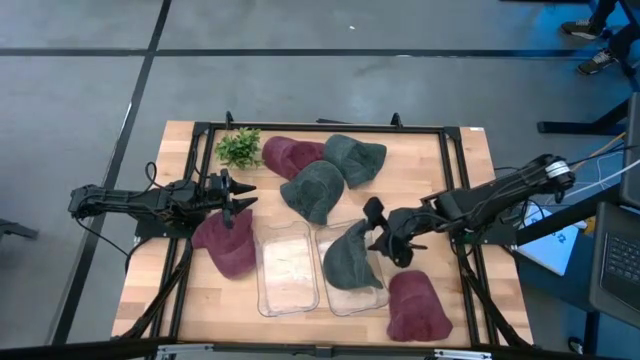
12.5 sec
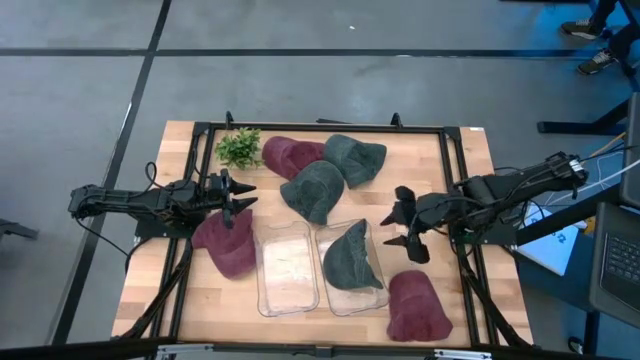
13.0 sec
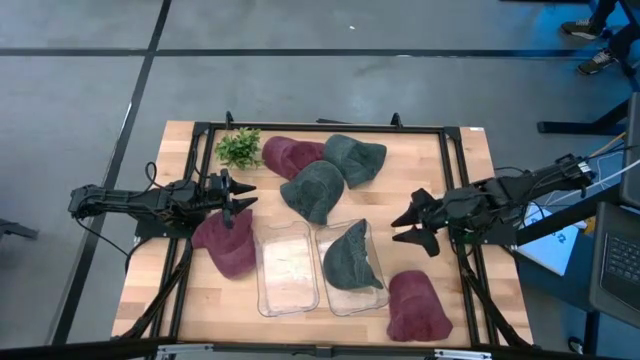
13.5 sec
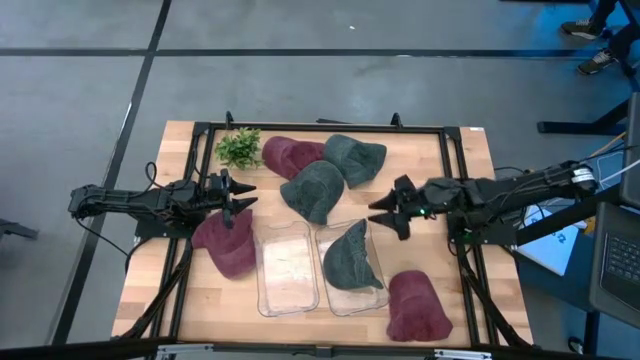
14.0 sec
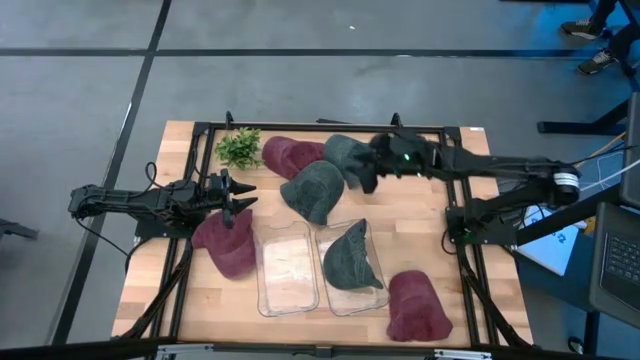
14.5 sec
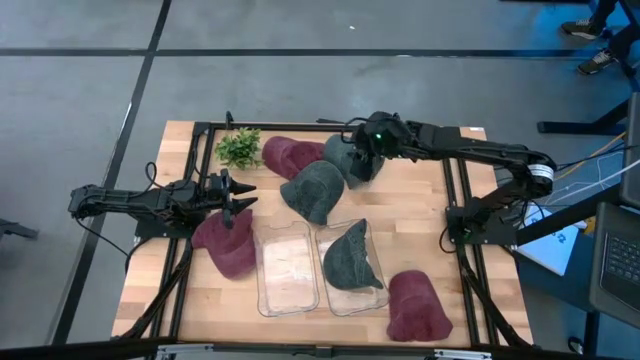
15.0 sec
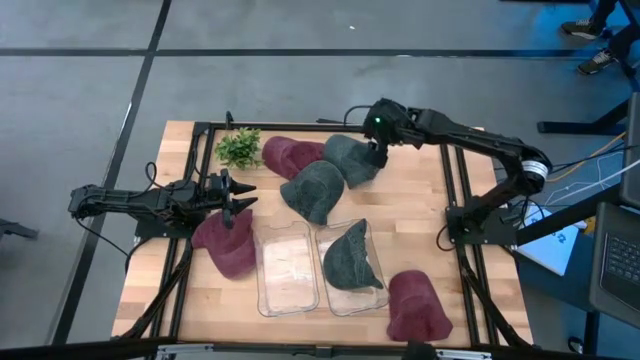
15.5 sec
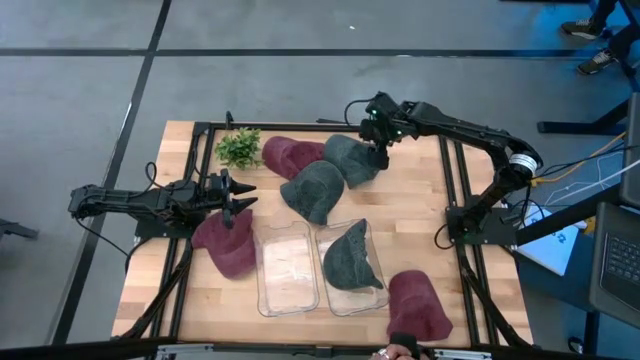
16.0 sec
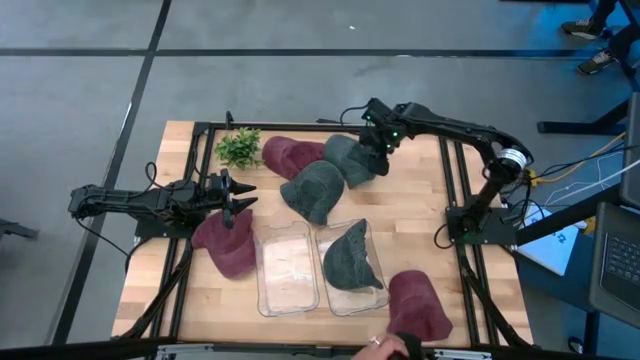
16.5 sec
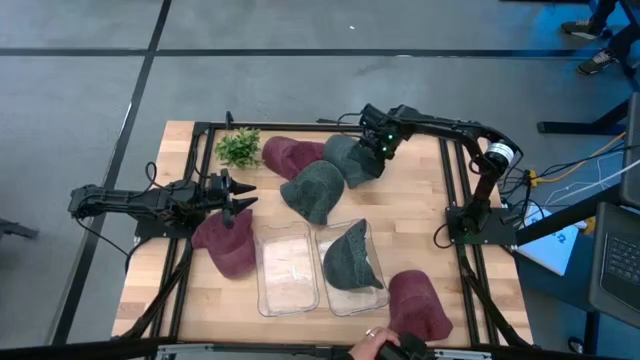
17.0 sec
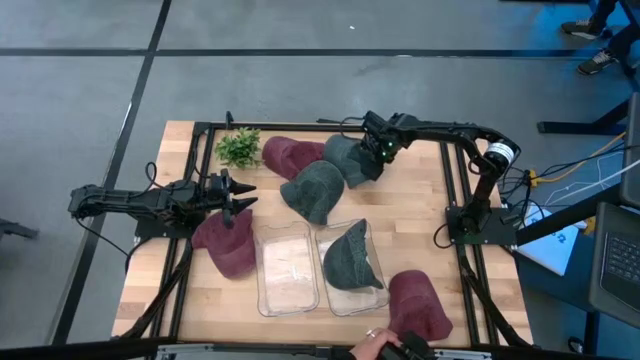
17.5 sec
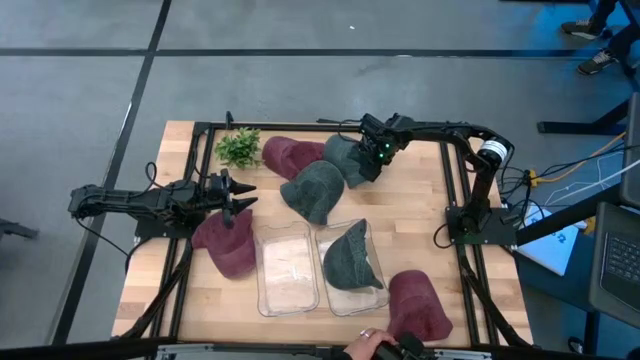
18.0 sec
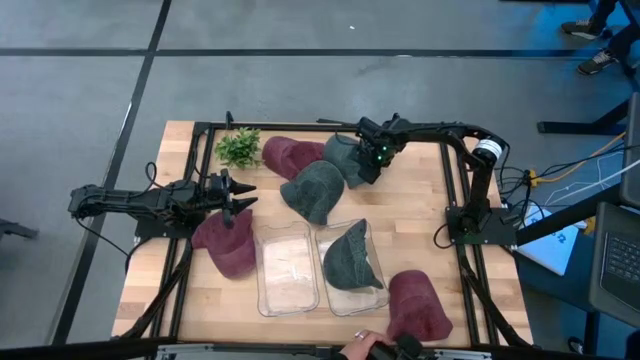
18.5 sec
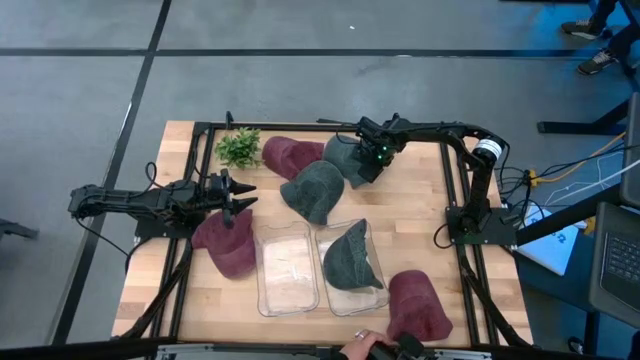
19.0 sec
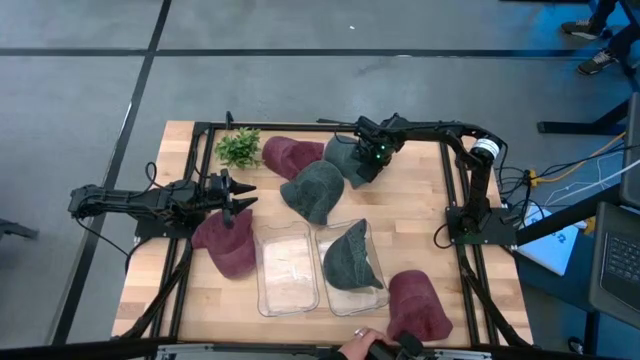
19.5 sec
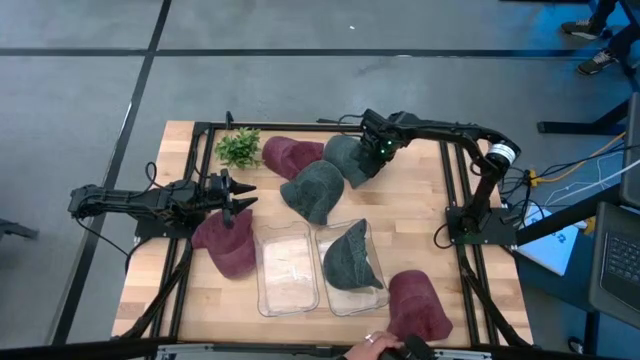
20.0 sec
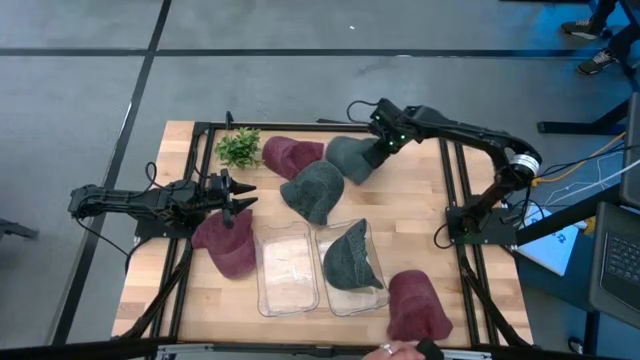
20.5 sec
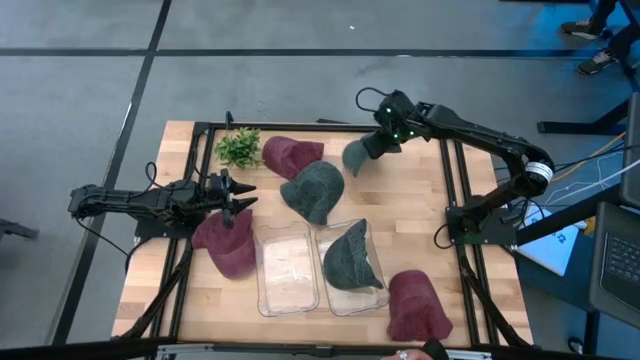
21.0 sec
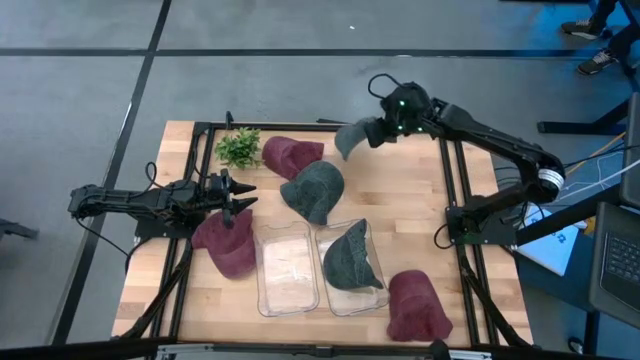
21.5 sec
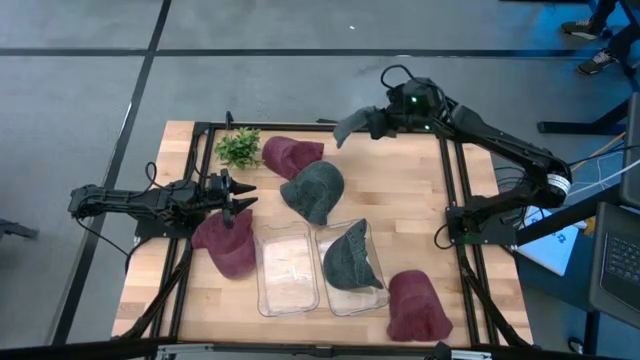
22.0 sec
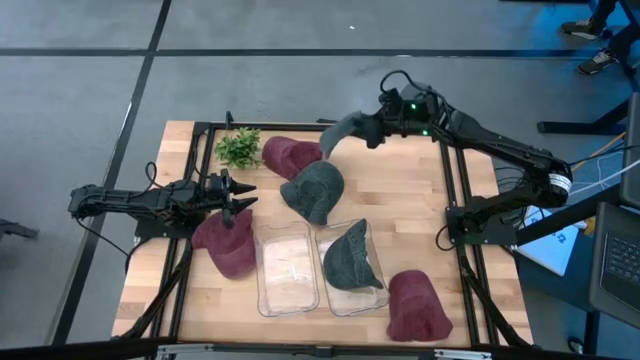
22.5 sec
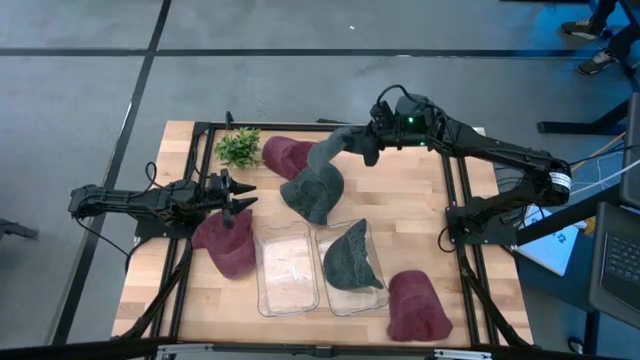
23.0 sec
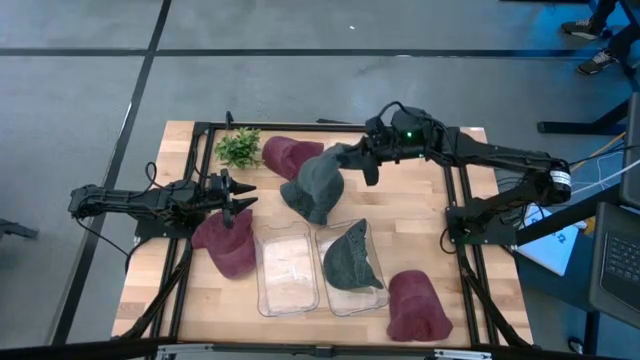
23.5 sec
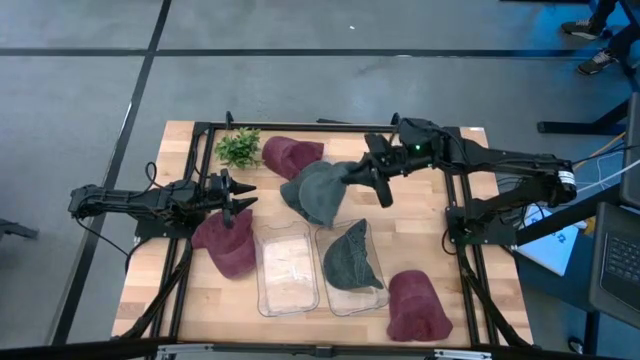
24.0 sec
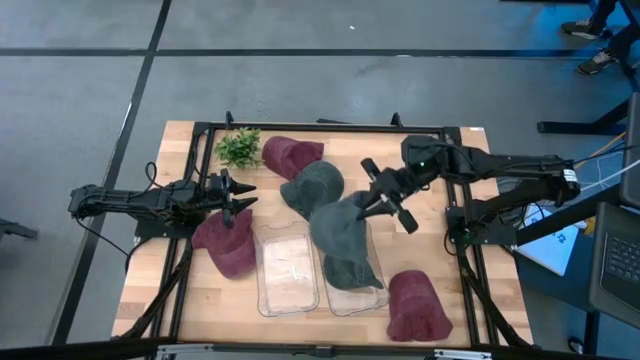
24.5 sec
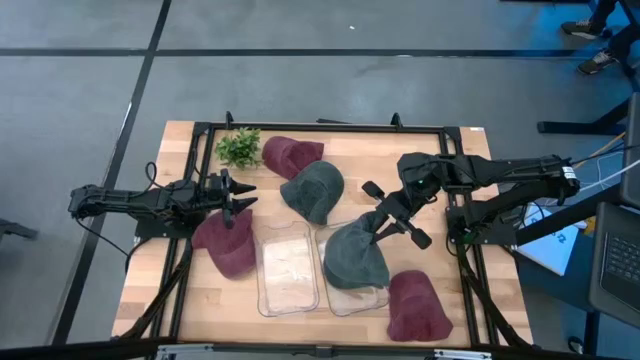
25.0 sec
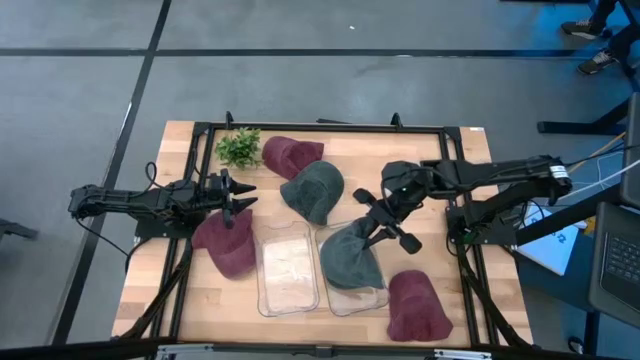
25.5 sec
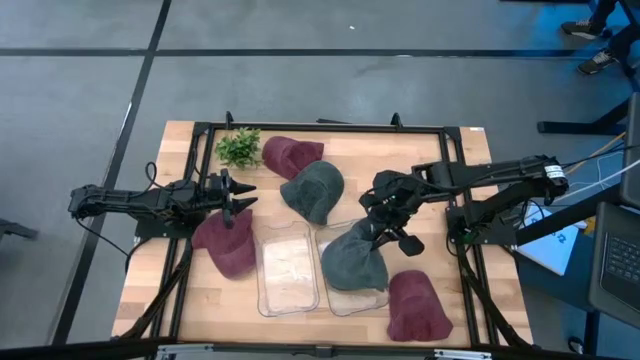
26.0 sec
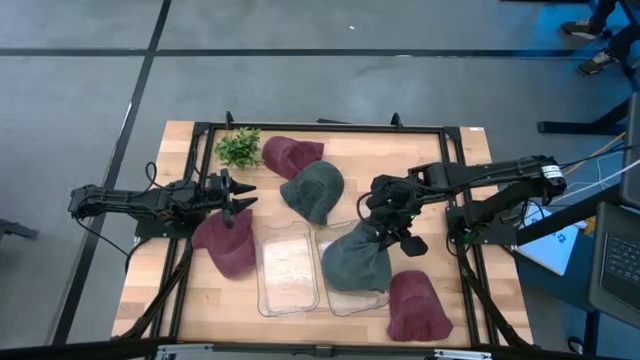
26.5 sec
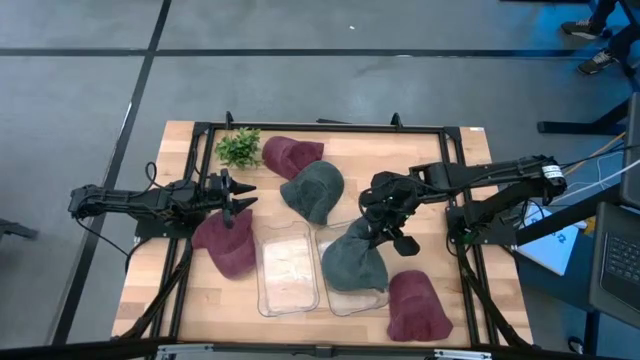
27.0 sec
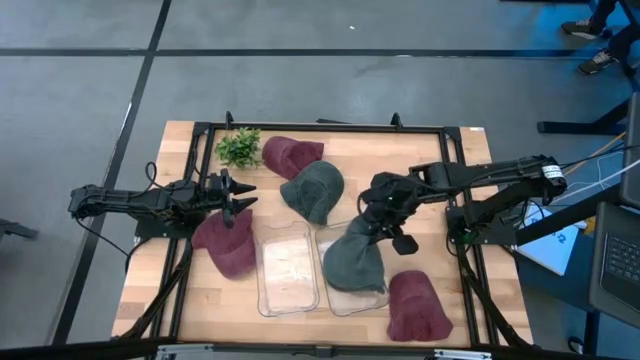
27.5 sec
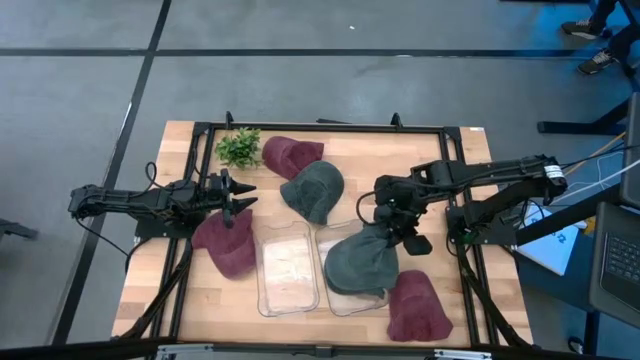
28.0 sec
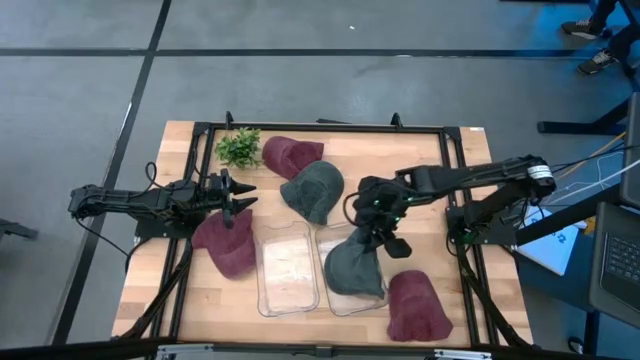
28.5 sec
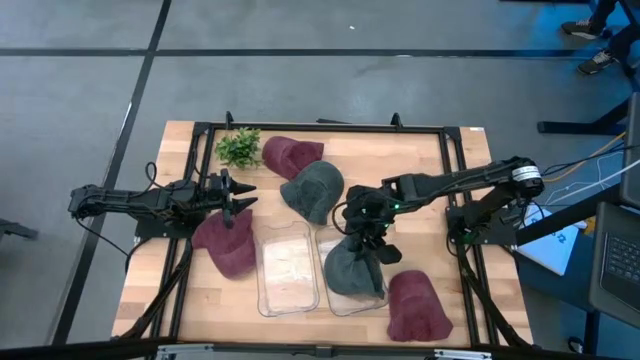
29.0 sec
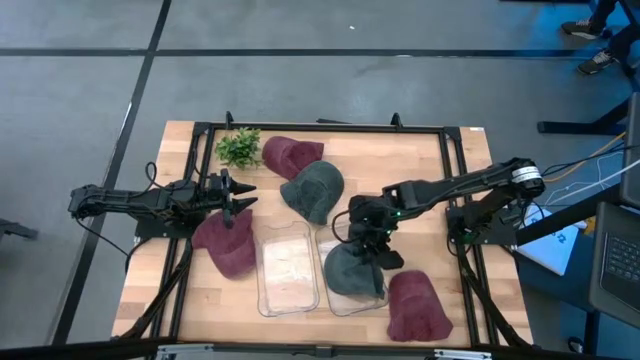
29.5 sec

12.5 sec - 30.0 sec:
Task: Pick & Place hat
Put the top black cap into the right transparent bin

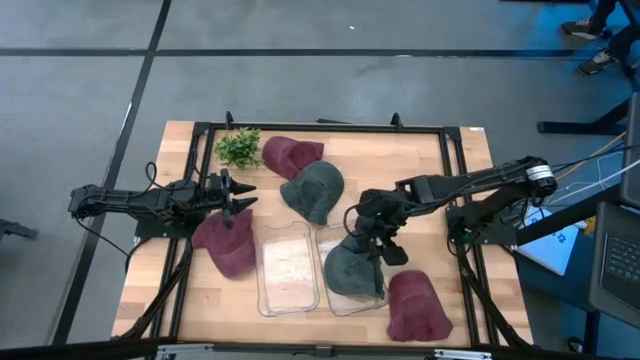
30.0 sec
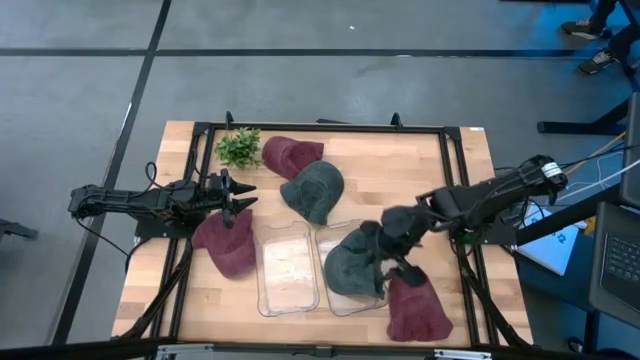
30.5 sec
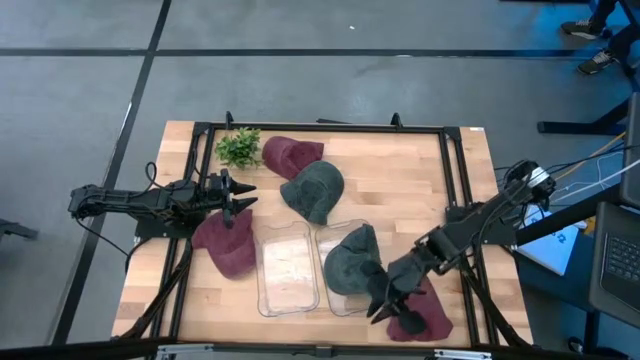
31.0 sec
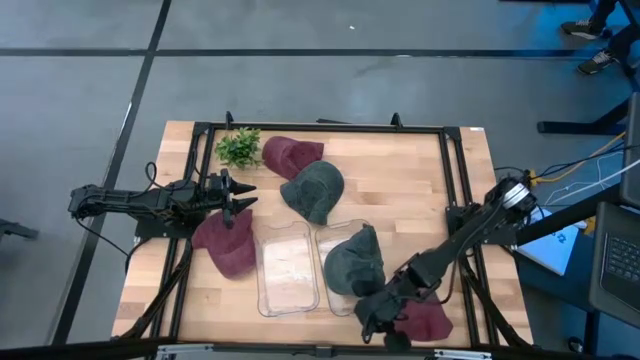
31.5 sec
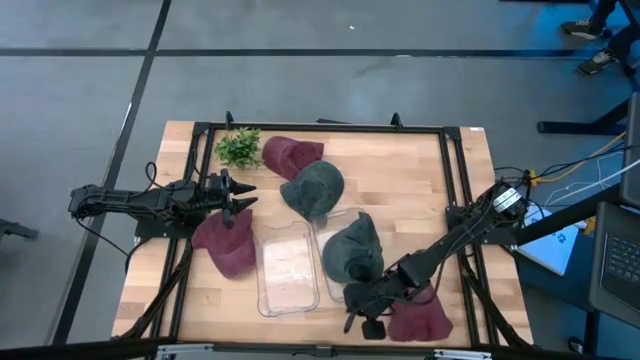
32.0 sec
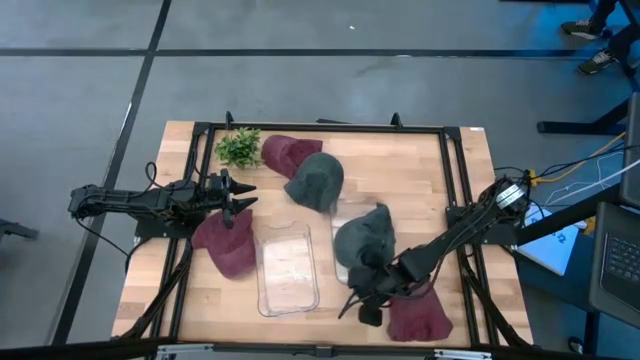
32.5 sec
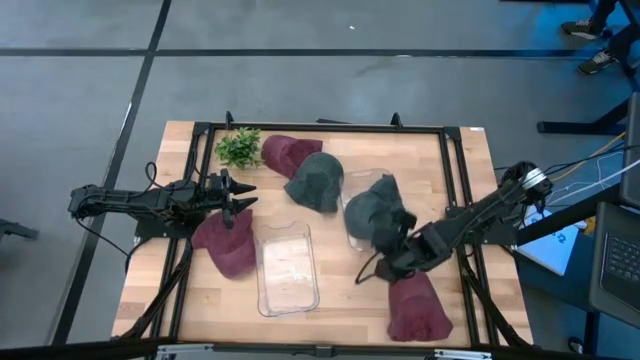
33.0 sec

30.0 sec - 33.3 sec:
Move the right transparent bin to the middle right of the table
